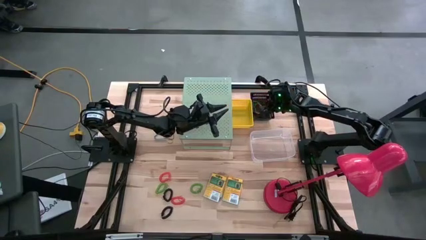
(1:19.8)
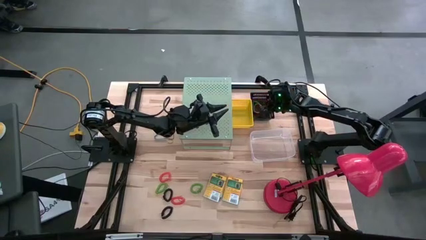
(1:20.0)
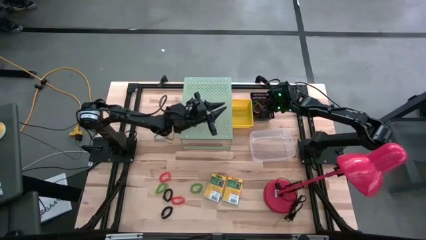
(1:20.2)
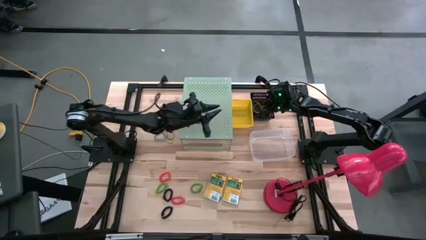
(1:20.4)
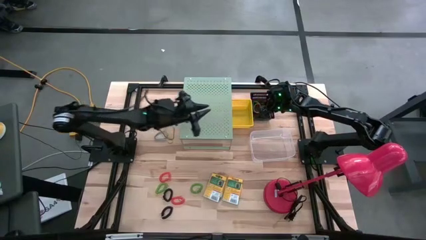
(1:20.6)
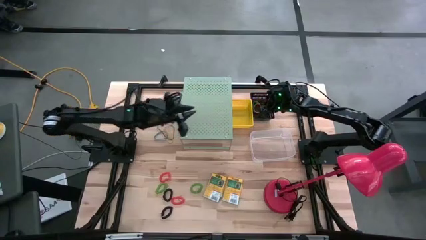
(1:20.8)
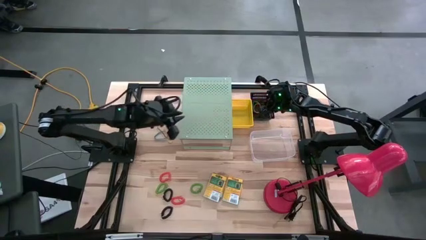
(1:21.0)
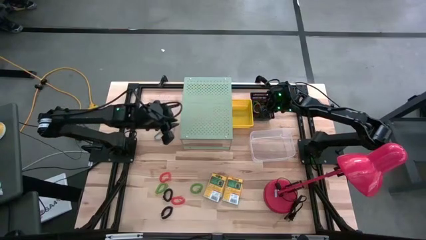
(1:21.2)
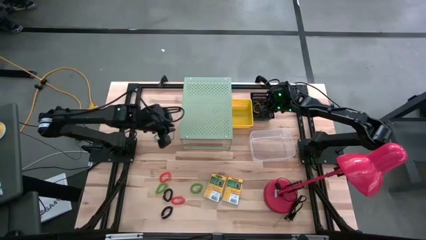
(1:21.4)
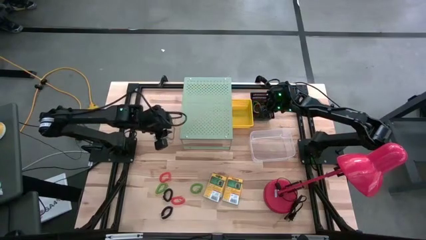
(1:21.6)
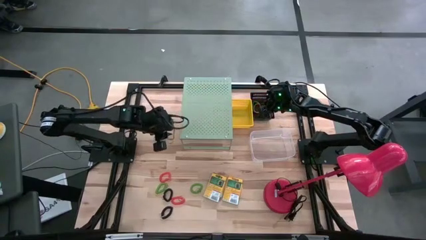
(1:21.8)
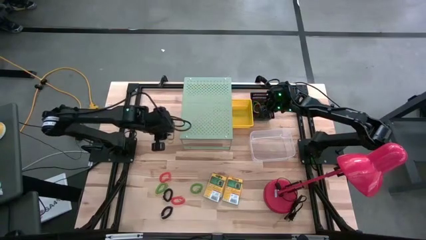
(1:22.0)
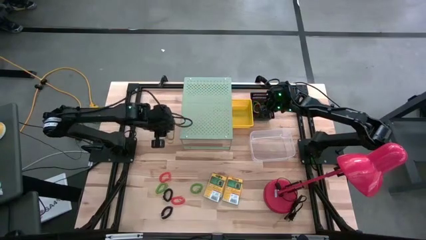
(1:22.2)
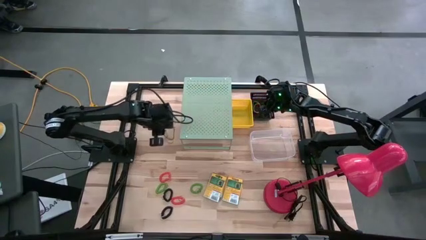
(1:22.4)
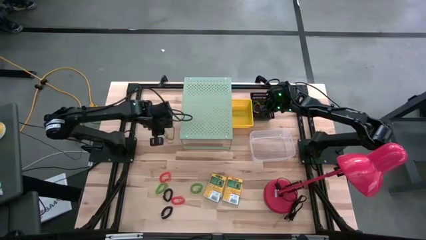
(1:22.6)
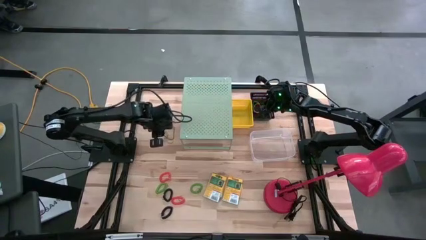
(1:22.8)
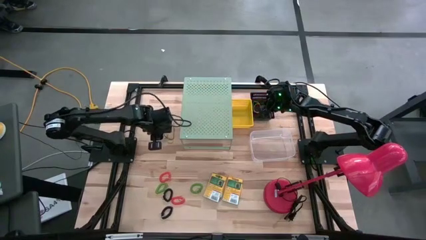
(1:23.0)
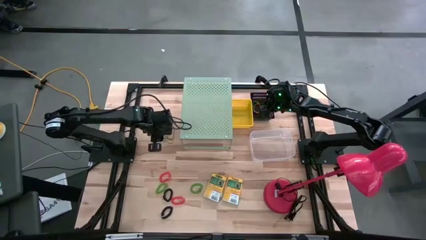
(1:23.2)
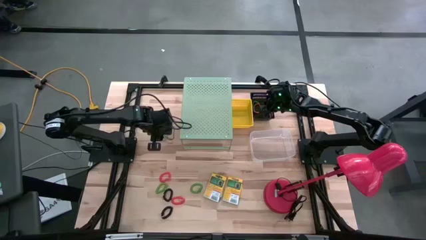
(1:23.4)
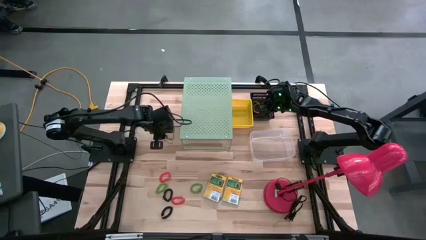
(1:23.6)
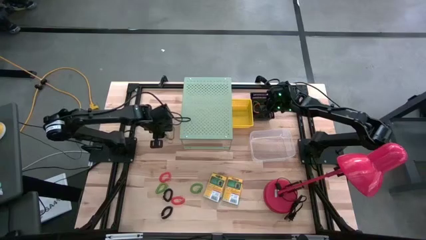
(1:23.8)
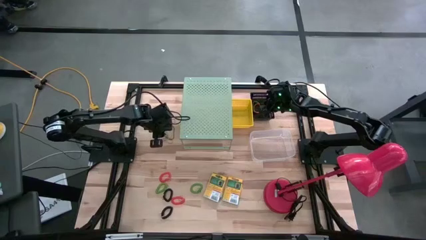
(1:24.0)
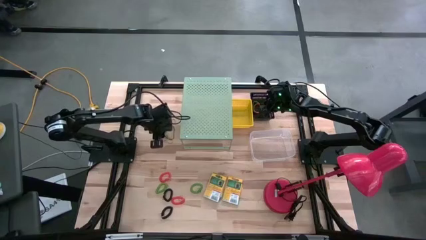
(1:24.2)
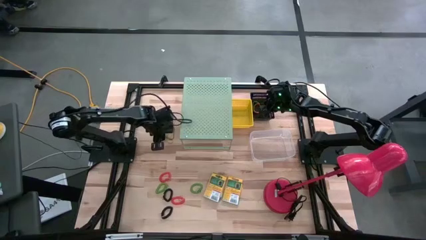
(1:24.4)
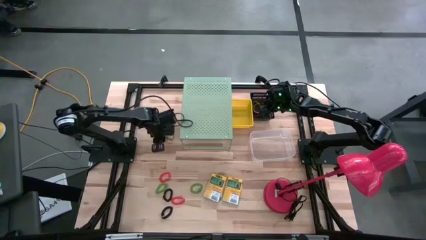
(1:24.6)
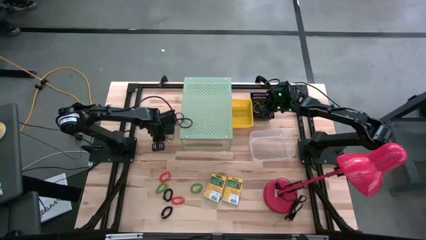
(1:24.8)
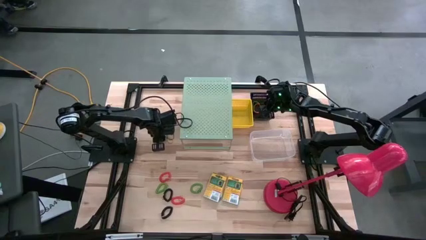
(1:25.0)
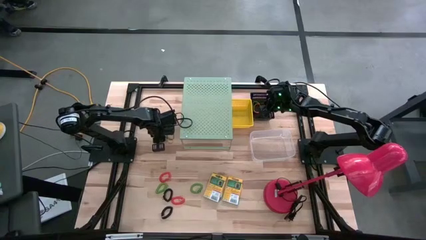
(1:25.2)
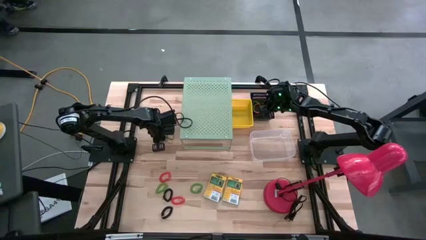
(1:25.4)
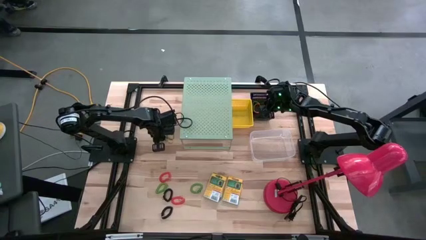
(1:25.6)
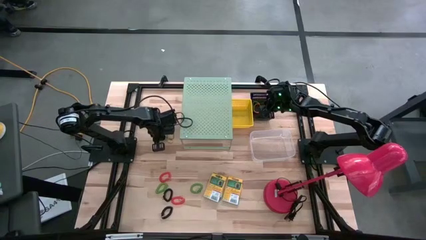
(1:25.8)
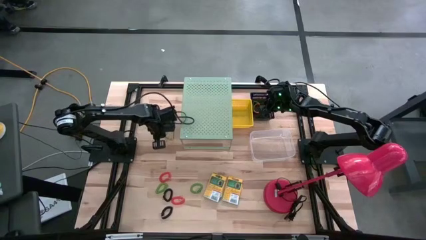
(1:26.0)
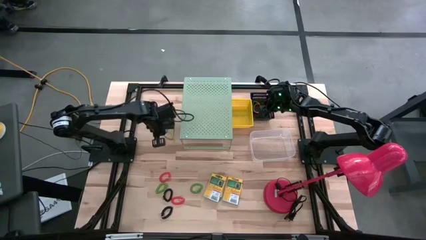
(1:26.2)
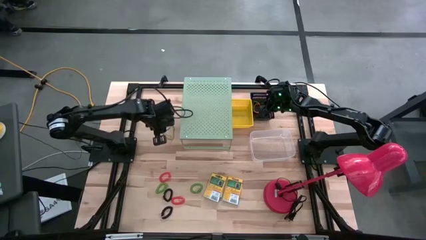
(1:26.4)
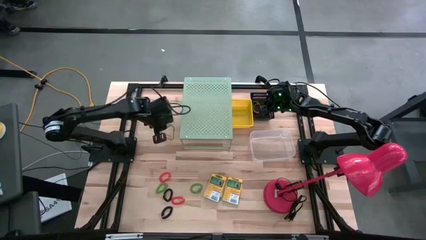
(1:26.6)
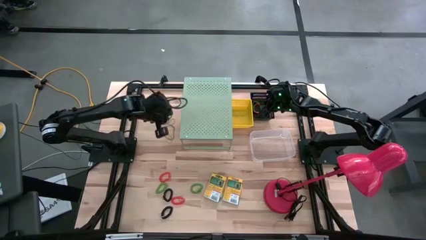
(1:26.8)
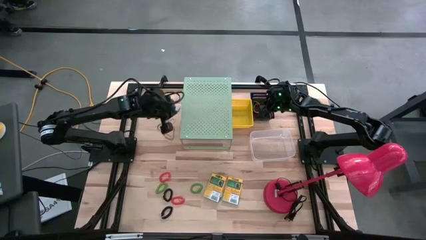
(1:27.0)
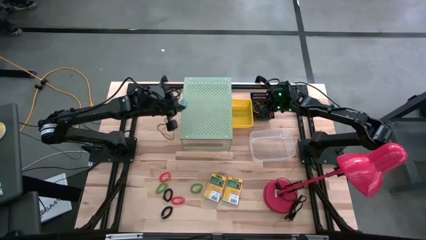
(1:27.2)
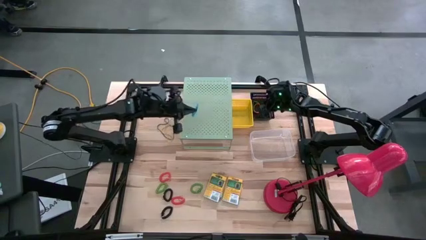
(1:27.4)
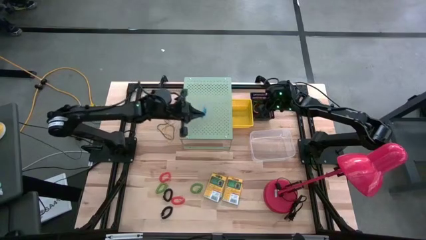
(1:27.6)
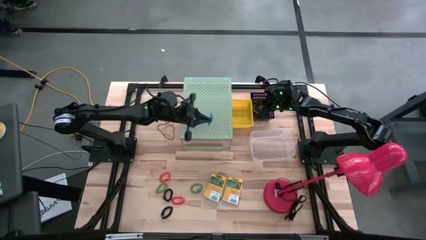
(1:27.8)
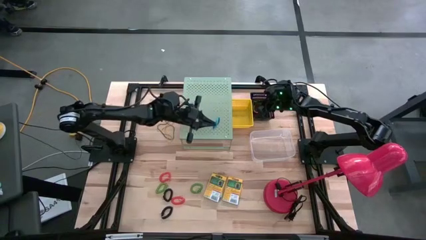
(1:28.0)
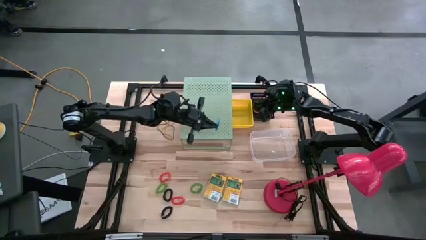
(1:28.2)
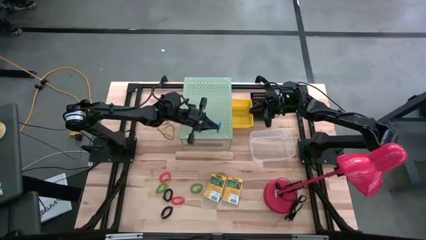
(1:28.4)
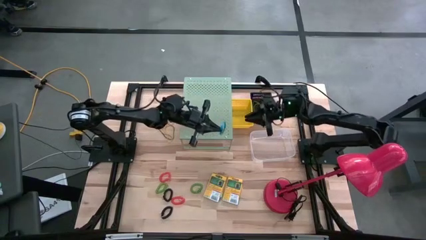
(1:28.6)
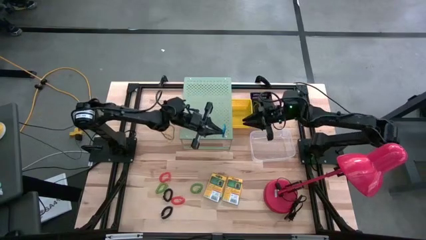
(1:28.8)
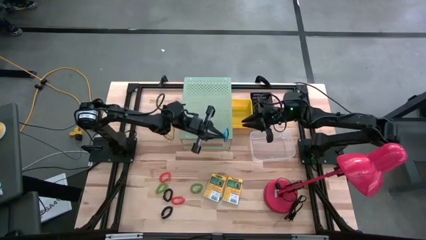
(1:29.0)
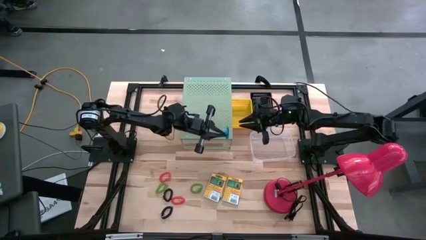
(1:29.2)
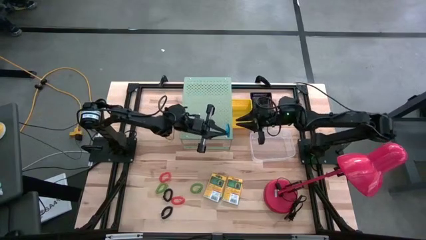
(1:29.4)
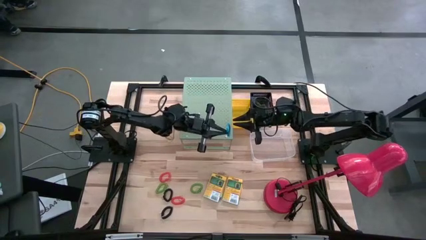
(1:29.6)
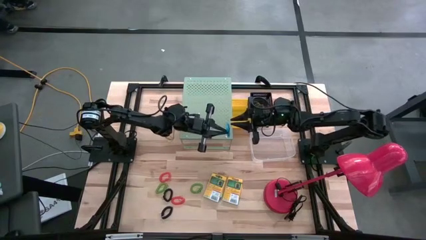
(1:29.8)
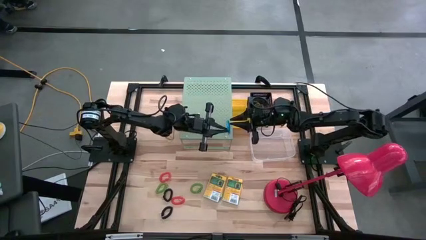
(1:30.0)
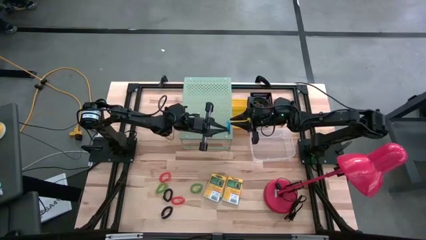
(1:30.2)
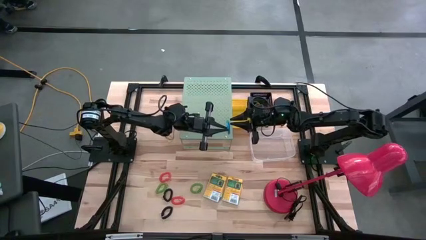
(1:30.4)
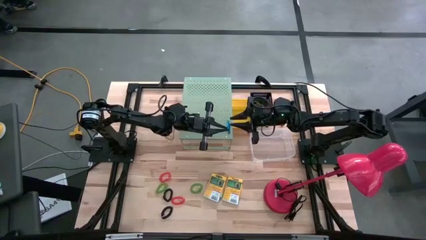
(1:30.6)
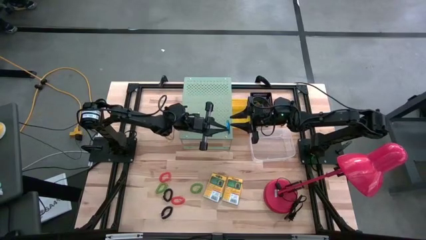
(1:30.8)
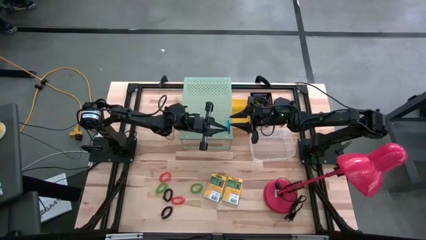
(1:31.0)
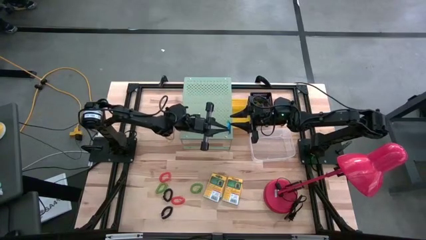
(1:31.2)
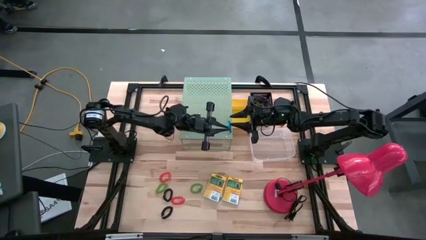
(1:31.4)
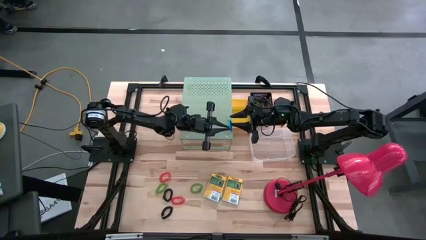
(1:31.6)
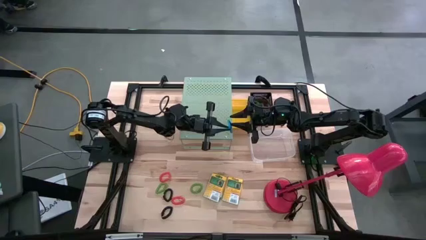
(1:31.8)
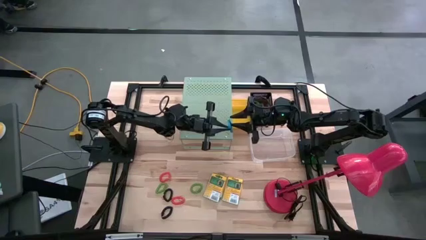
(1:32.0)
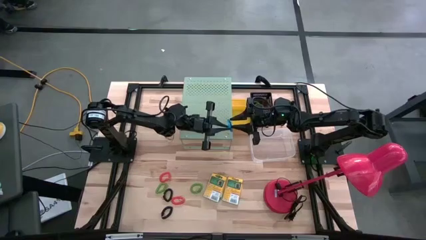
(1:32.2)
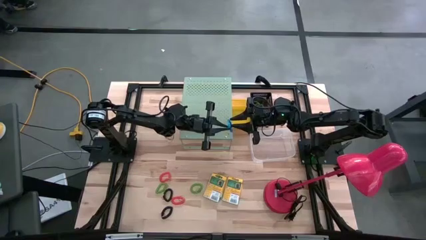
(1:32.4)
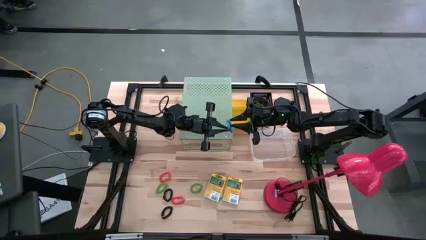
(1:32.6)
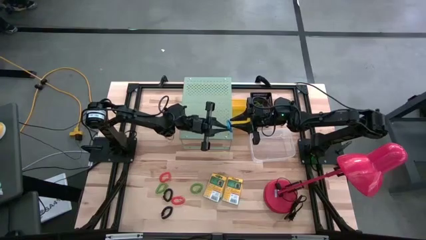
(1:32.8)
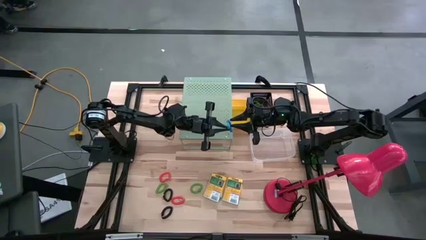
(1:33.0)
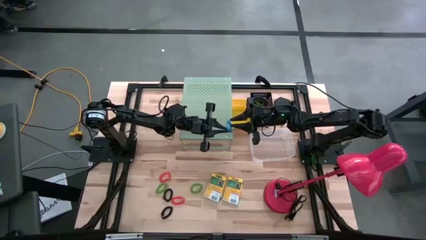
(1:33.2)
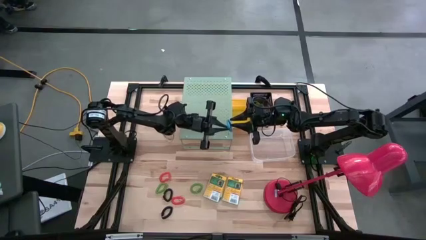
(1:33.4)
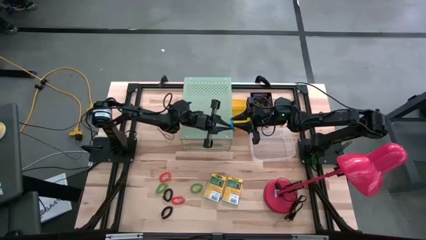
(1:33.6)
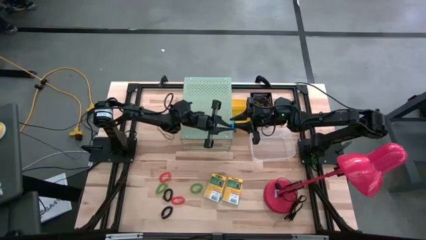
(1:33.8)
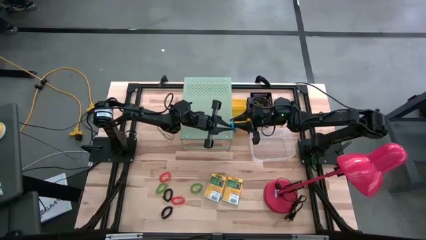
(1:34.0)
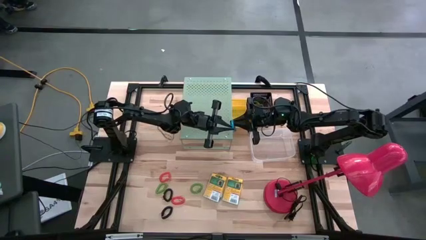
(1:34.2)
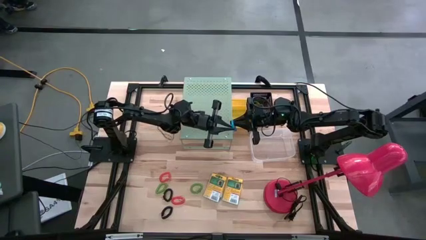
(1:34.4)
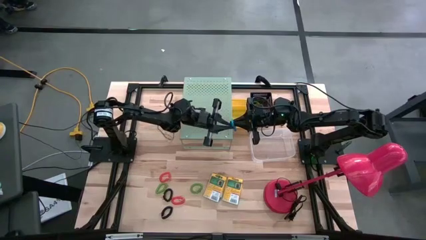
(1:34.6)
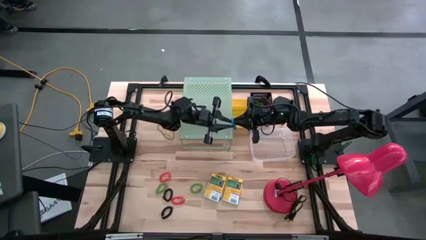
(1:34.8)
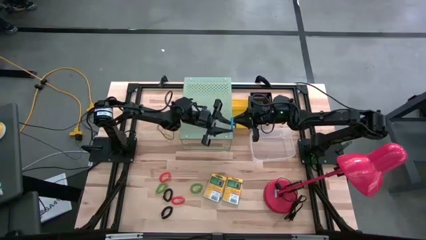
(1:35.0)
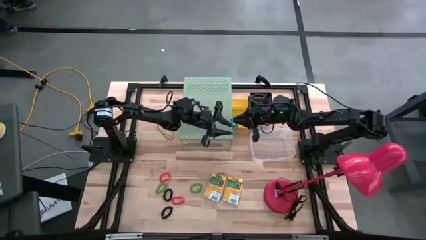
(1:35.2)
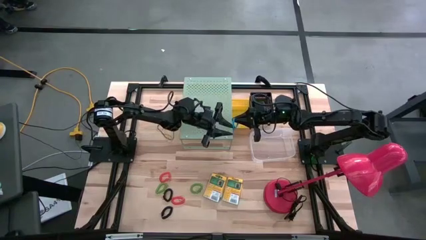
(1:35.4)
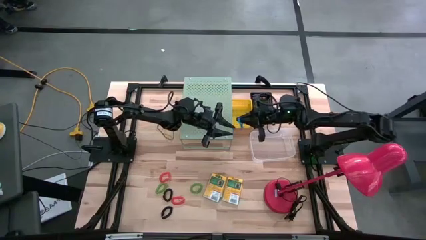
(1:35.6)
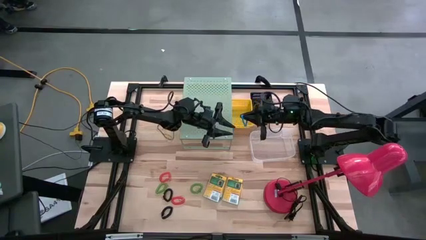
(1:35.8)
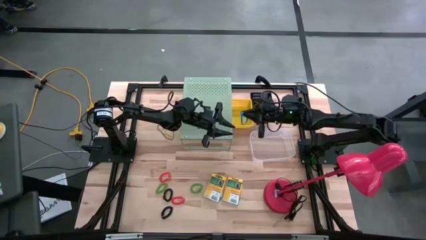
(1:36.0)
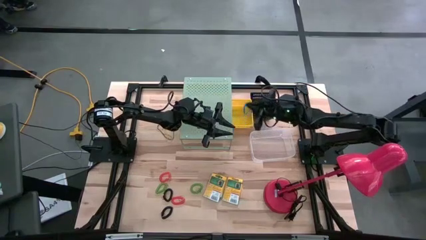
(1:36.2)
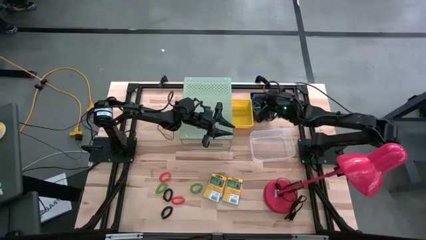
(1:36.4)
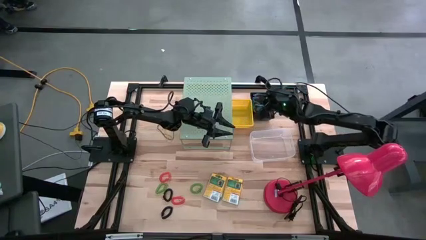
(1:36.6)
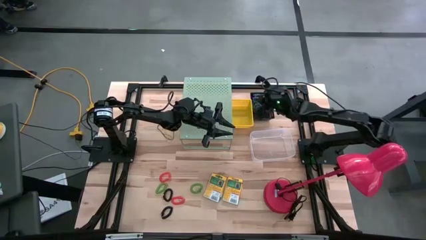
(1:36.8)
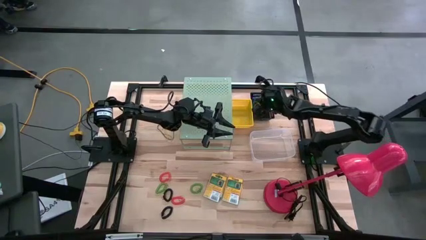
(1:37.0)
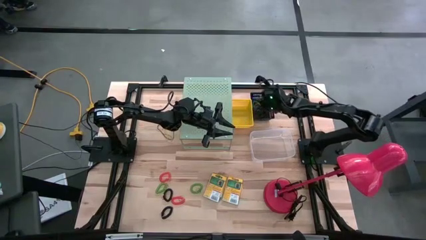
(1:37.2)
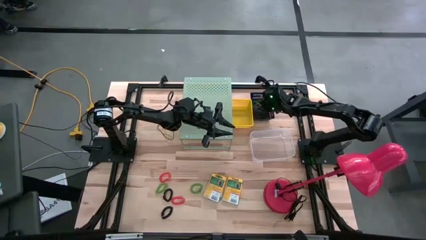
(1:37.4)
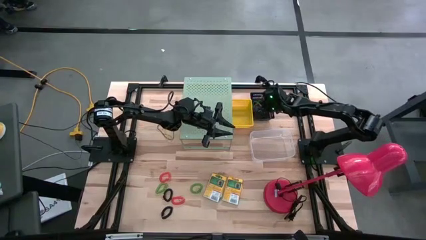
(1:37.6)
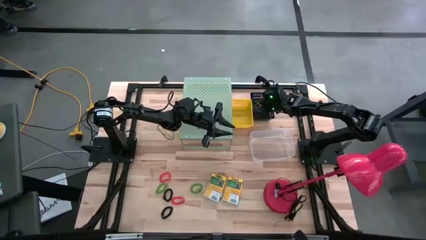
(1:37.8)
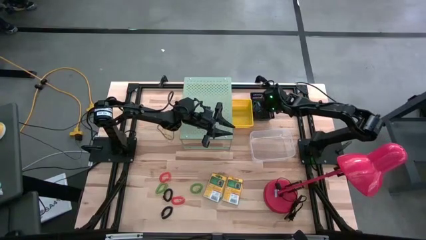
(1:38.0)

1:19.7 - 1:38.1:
Task: Pick & Place Office Desk Supplies
Put the blue rubber band into the black bin
